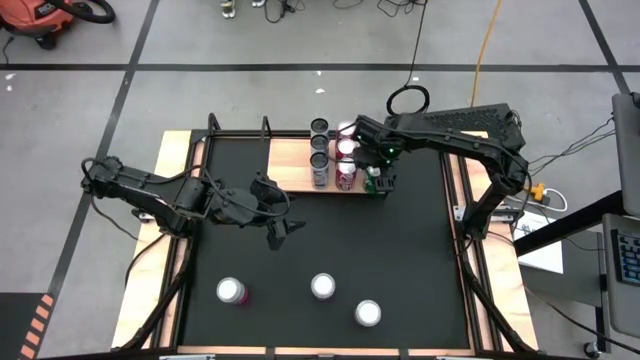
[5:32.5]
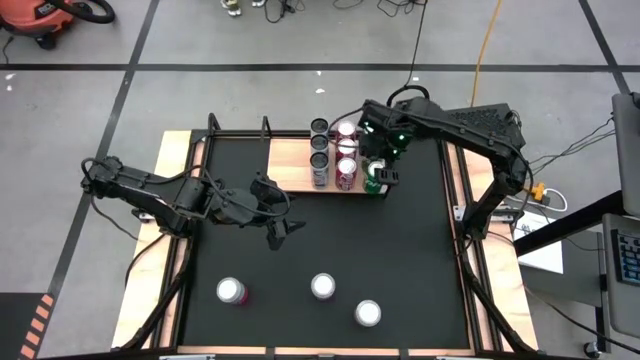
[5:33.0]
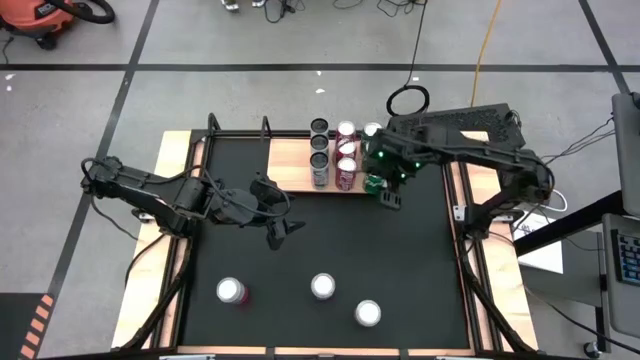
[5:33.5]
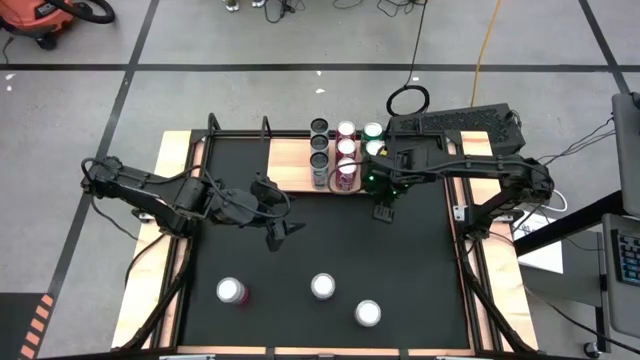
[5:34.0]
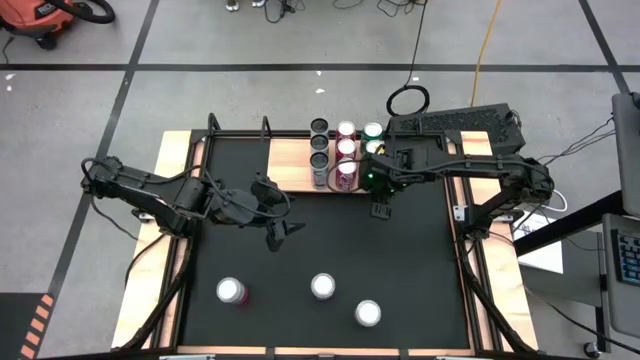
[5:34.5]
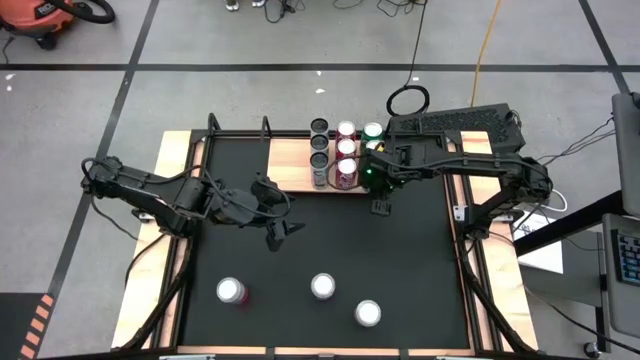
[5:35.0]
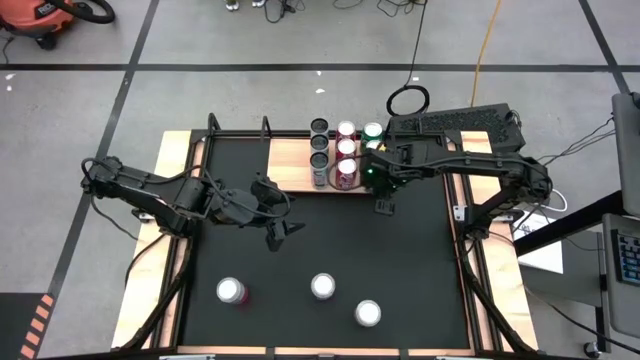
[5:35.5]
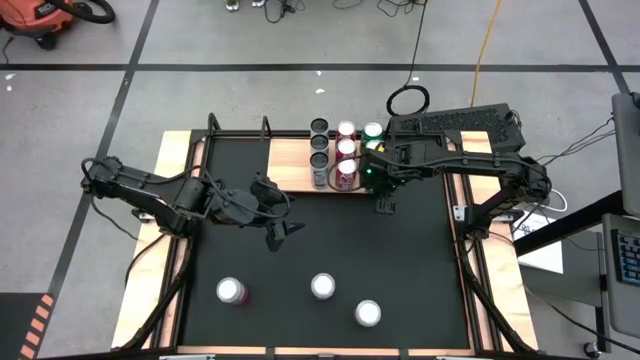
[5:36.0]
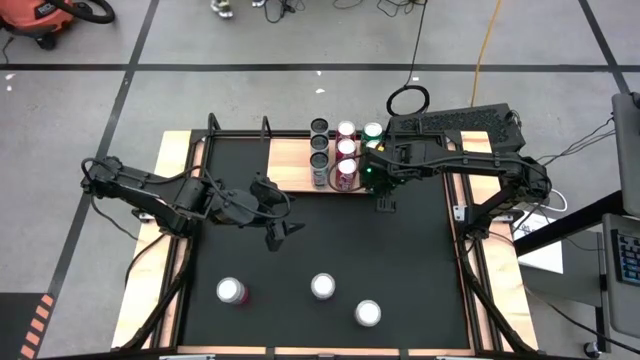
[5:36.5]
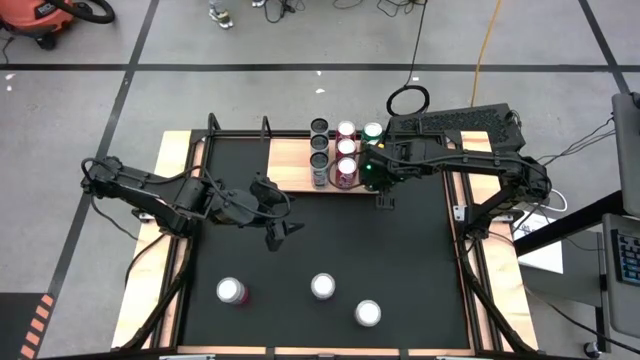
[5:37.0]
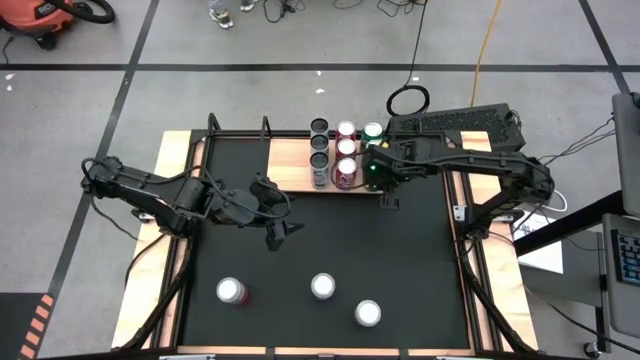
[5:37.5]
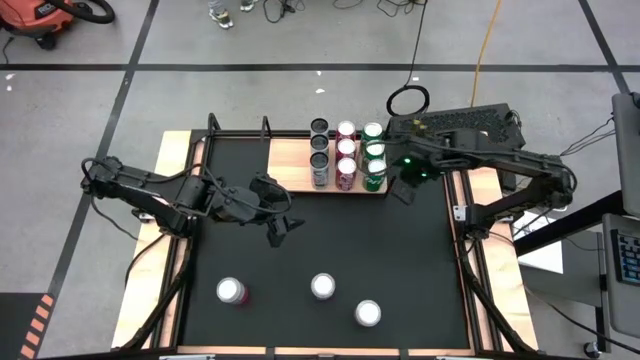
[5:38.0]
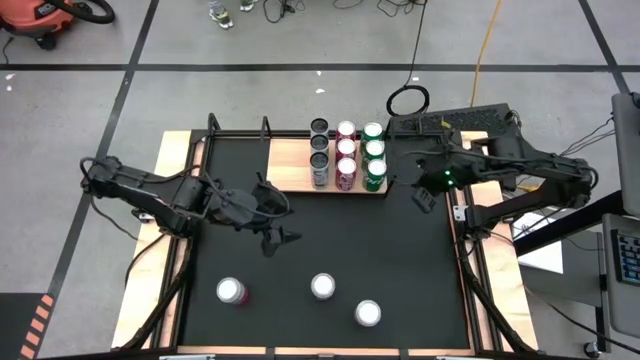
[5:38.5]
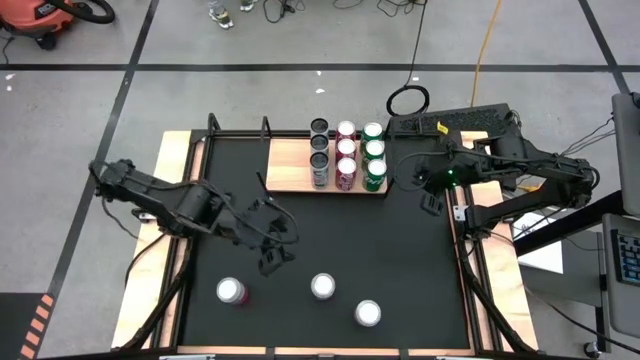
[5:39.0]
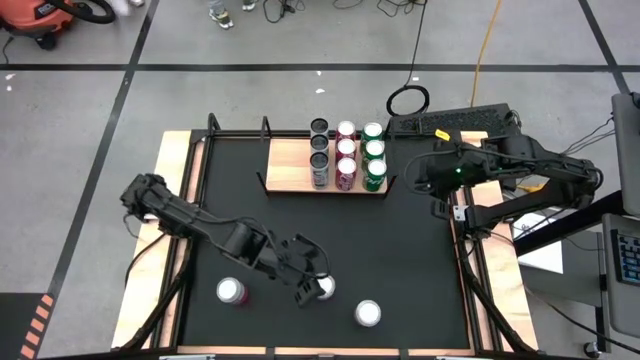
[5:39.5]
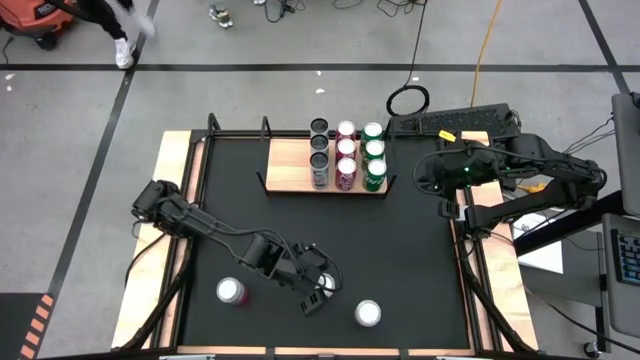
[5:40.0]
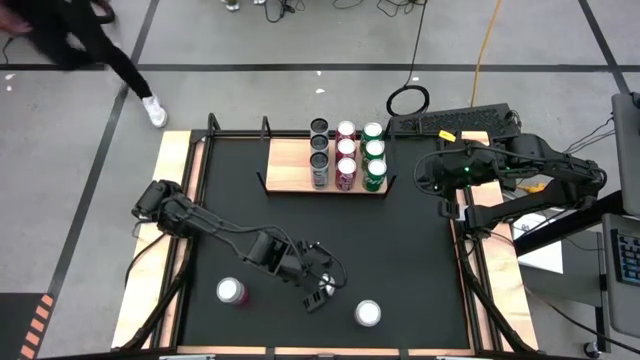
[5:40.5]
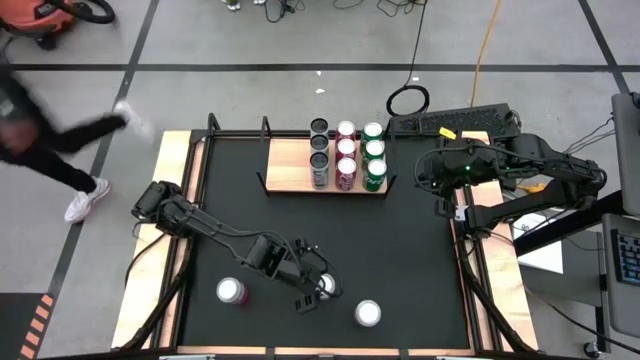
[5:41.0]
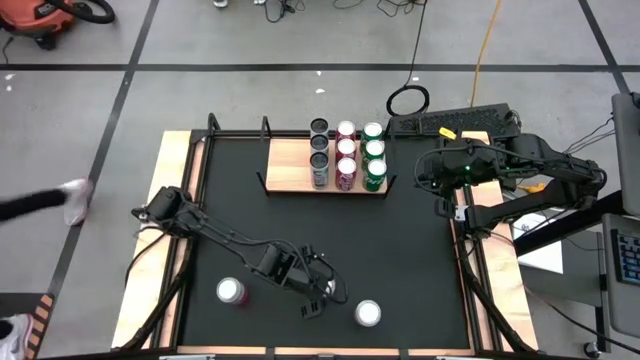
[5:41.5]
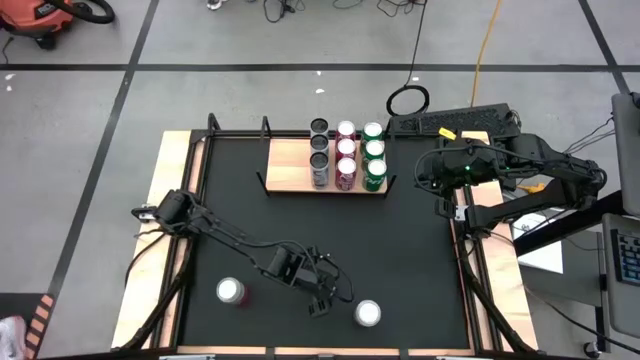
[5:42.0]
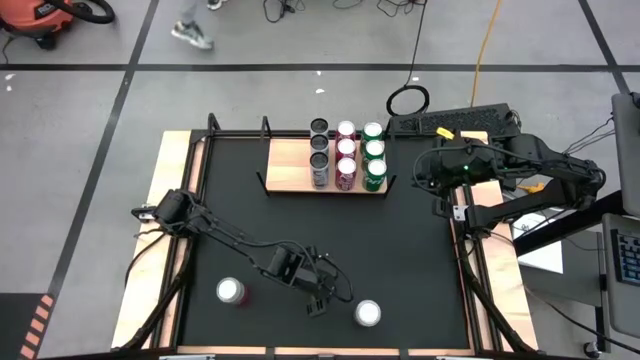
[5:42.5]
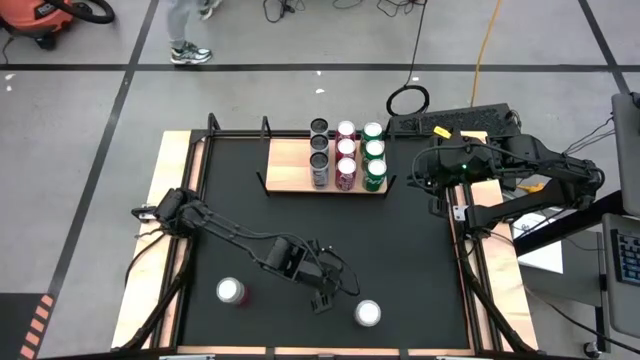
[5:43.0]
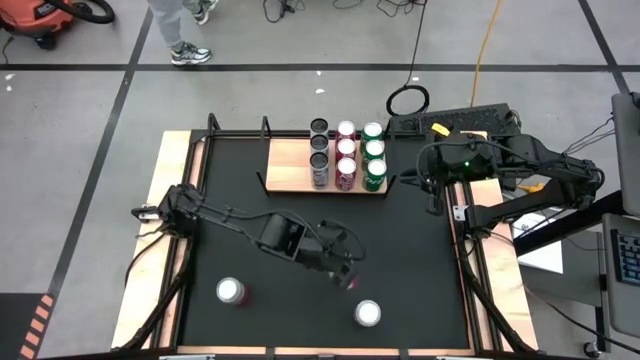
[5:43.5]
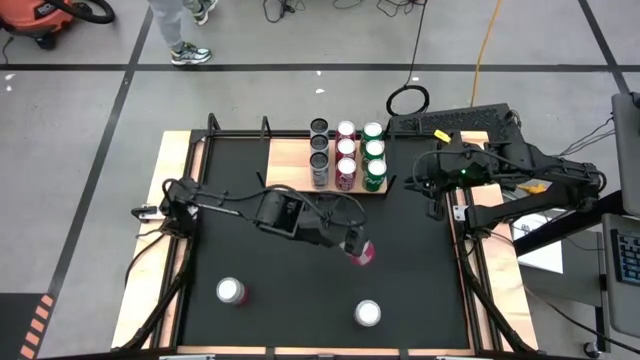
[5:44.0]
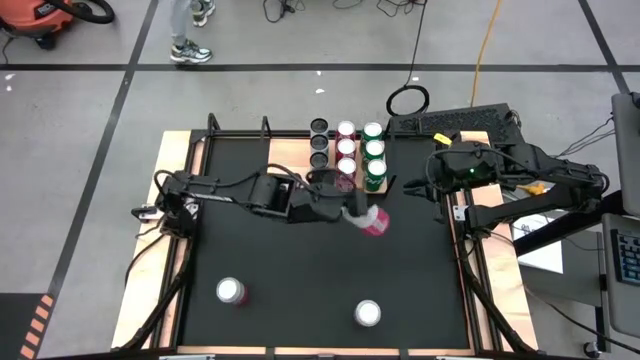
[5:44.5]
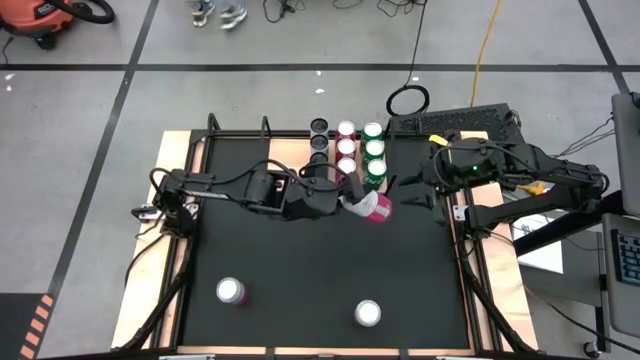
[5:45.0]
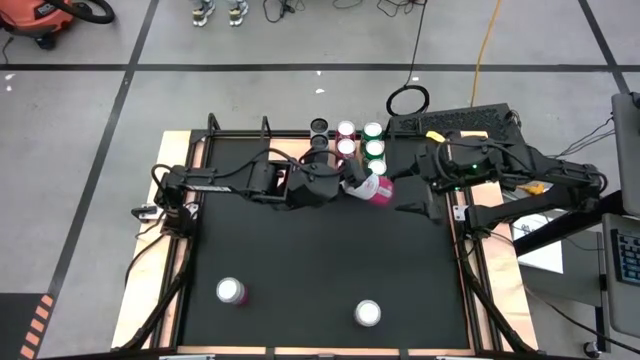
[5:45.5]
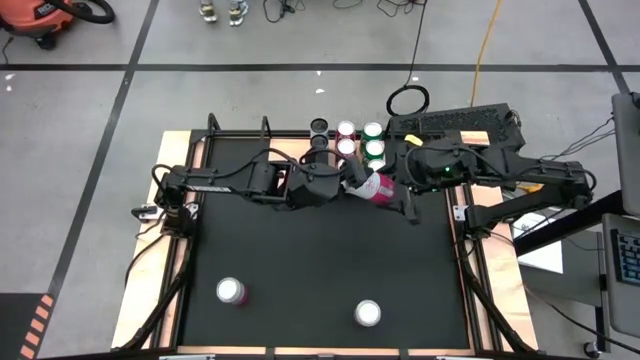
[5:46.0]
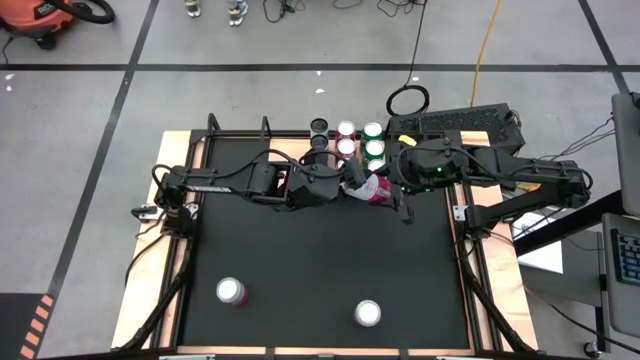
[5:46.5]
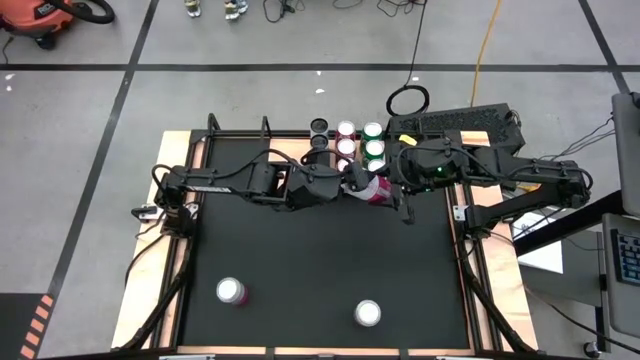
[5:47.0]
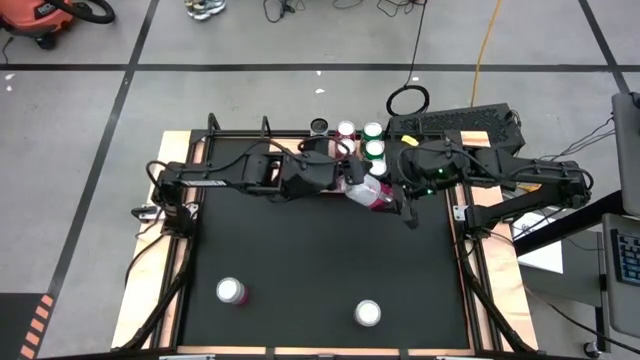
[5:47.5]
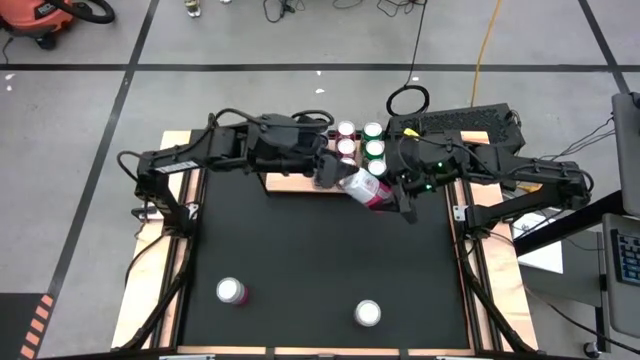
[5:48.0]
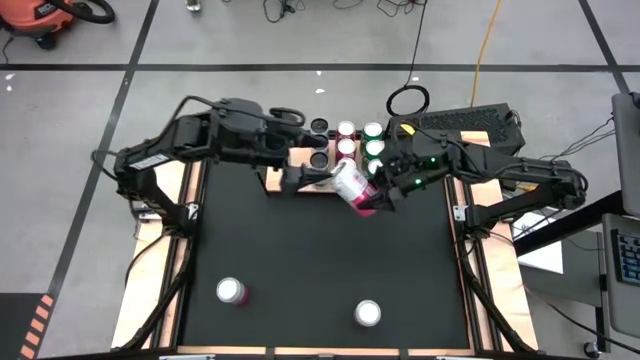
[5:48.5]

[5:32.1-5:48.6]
Task: Place canned beverage on shelf
Put the middle pink soda can on the shelf

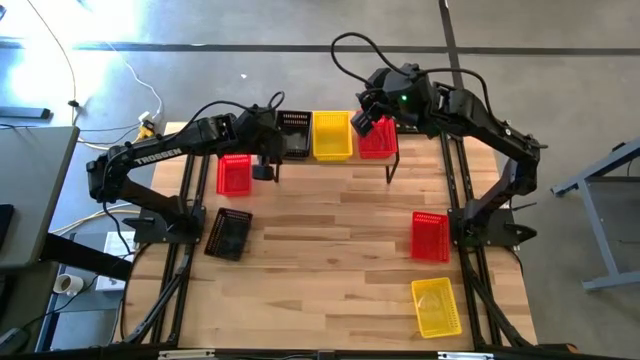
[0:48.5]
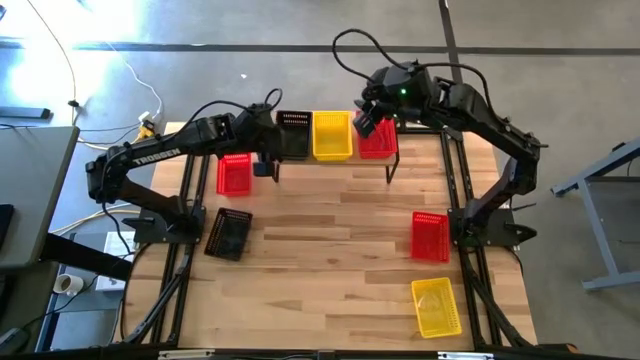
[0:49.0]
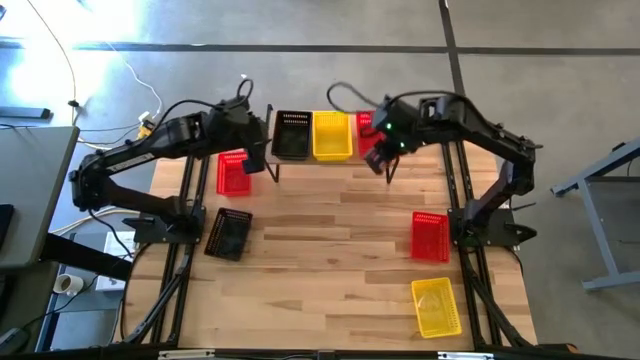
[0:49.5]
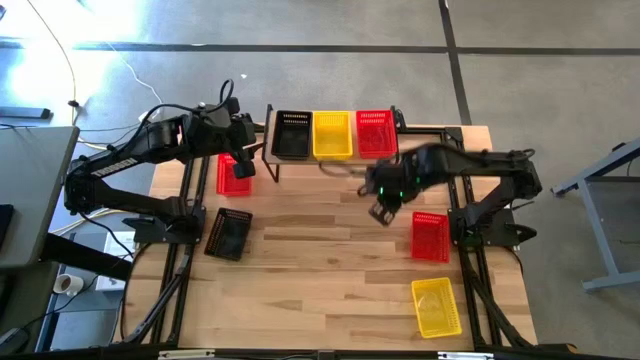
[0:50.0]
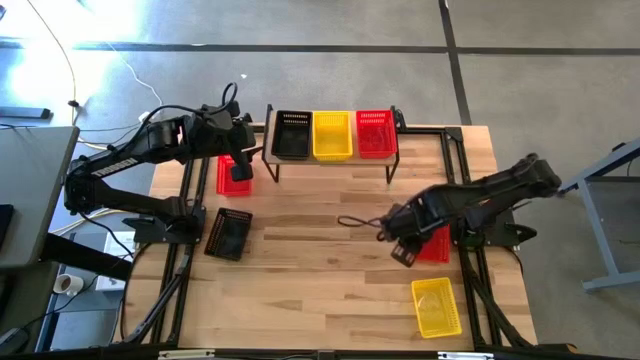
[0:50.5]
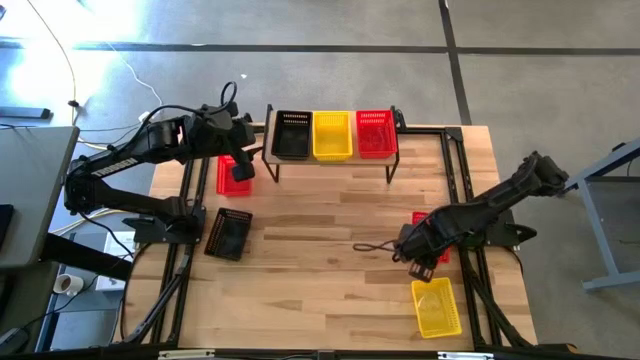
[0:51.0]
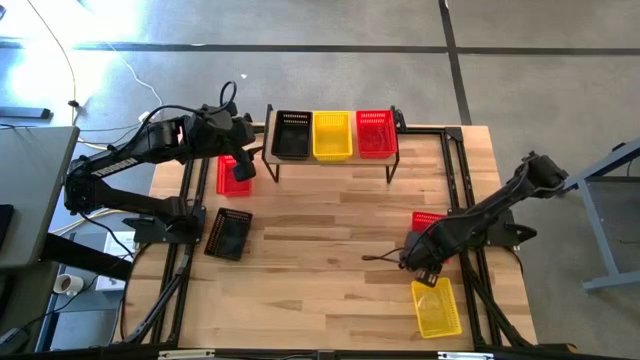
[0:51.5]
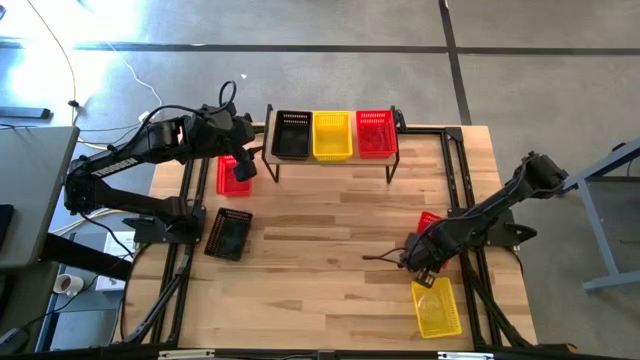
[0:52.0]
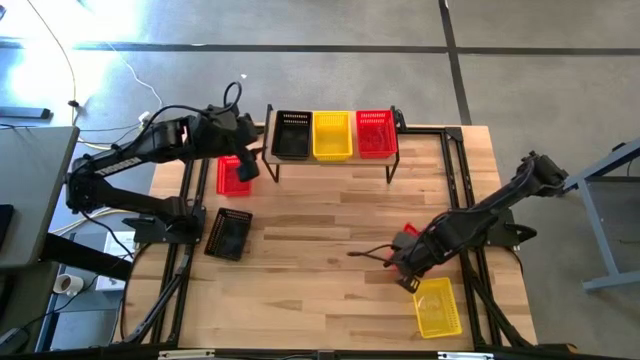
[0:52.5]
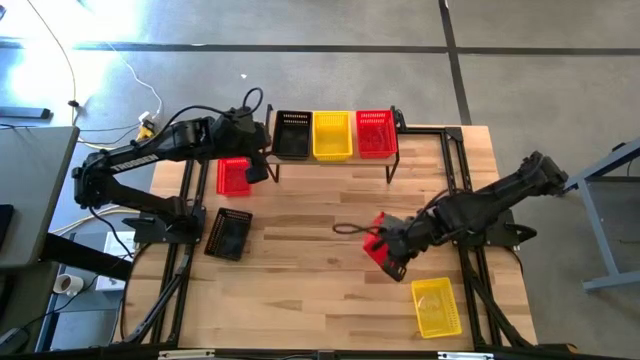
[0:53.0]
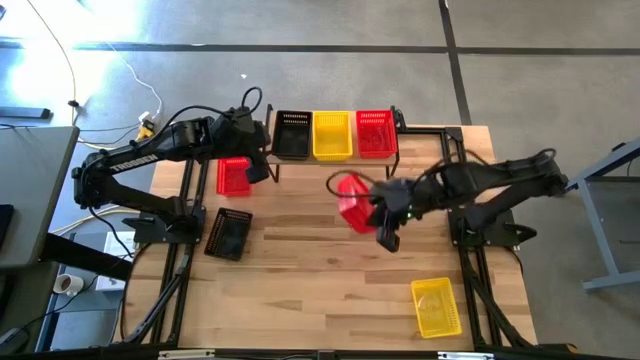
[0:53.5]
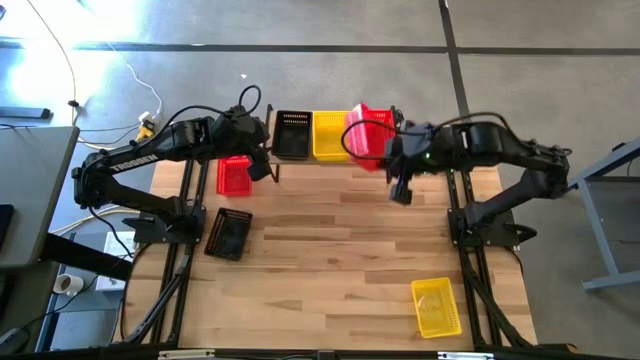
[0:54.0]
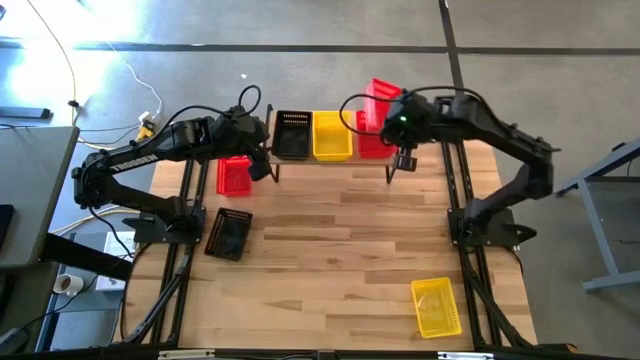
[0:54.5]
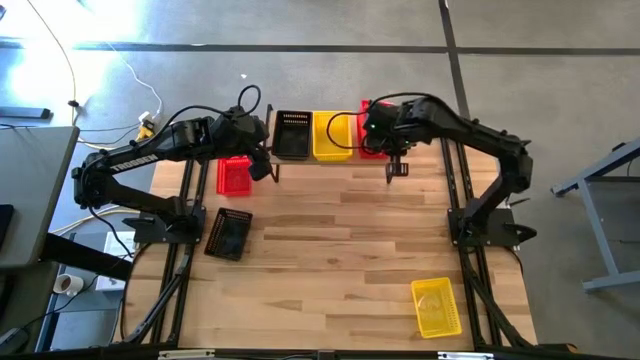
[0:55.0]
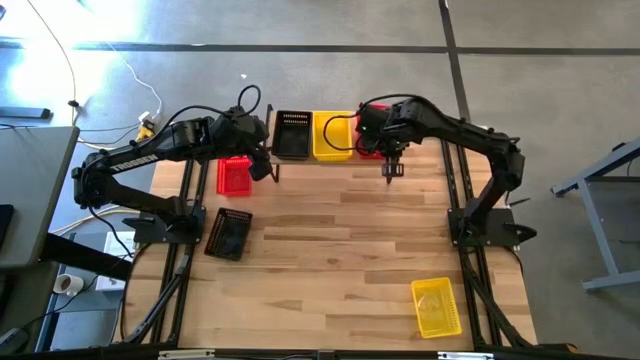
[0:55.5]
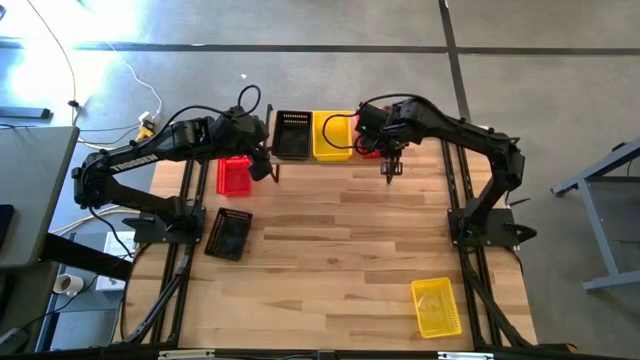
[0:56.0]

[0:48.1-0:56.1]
Task: Stack baskets on shelf by color
Stack the right red bin on top of the red bin on the shelf
